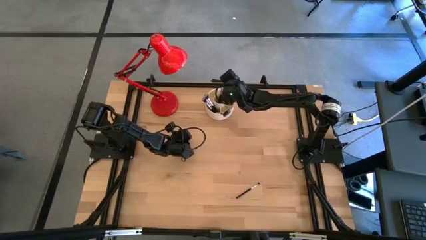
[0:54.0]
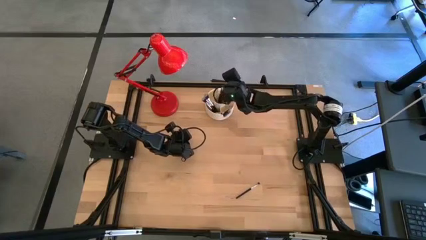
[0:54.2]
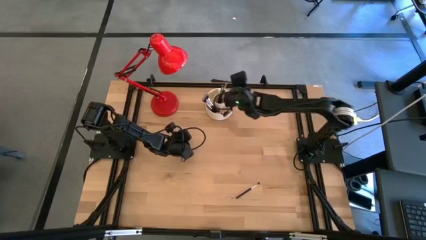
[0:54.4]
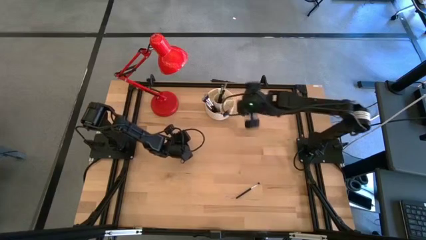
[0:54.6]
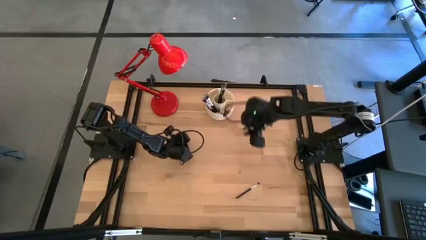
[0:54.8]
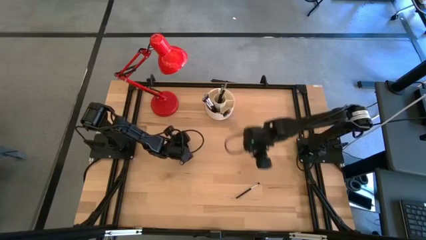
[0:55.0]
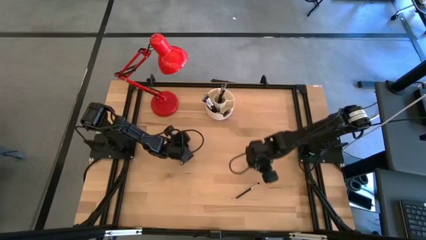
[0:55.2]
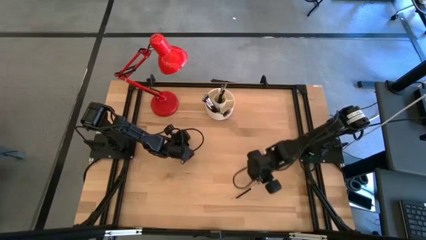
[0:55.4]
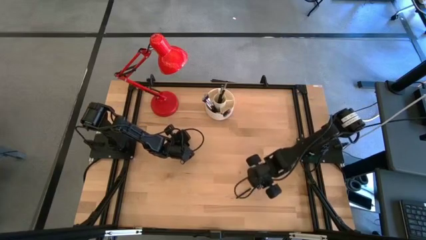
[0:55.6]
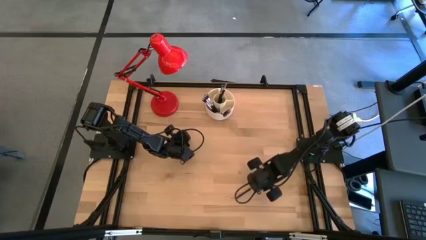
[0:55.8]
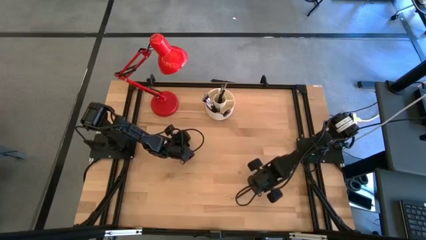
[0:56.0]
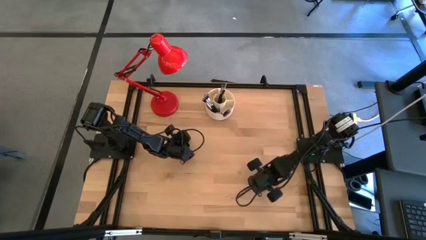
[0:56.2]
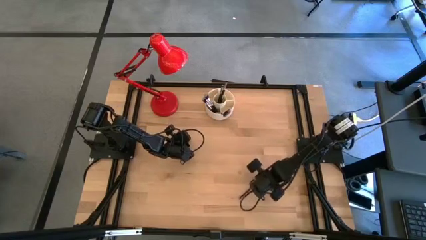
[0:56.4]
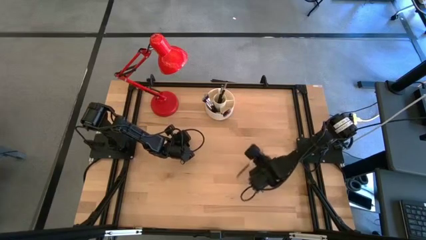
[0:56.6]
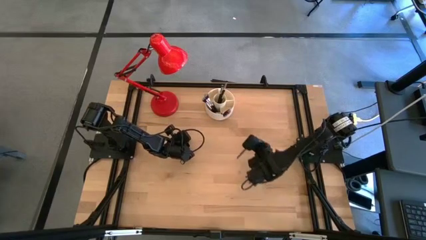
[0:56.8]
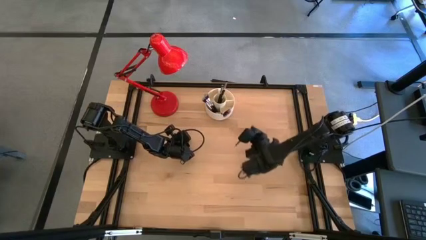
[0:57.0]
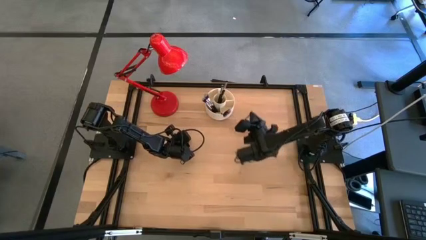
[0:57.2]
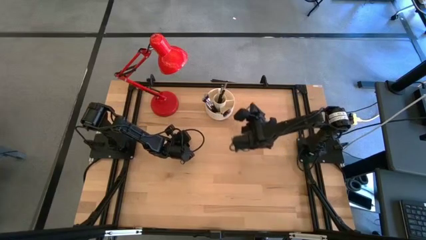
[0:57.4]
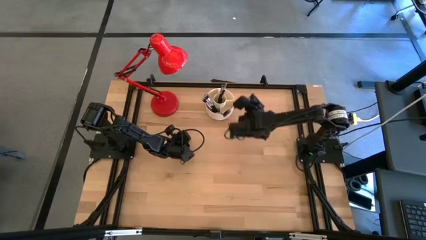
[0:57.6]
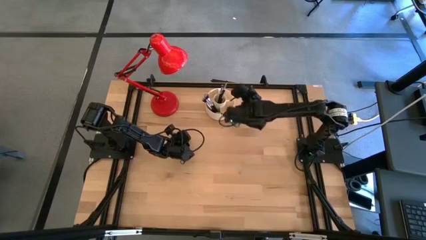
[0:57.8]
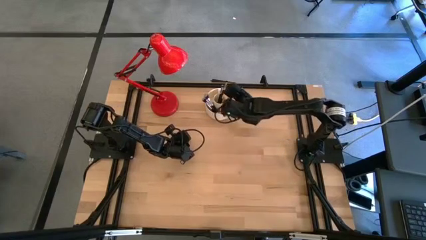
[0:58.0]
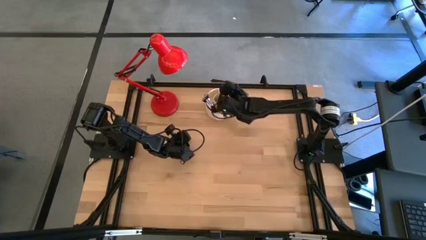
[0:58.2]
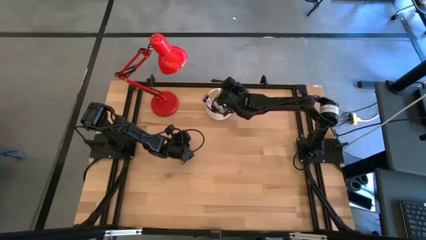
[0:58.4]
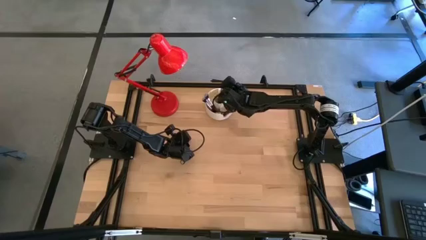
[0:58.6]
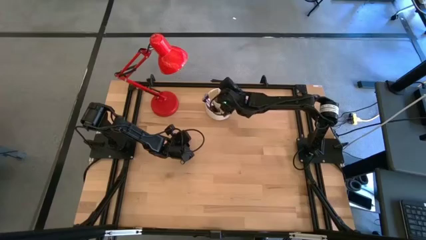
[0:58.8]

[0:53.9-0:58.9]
Task: Put items in baskets/containers
Put the black eyeshadow brush into the white organizer

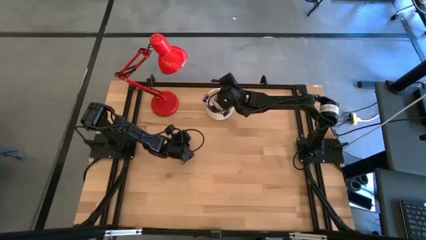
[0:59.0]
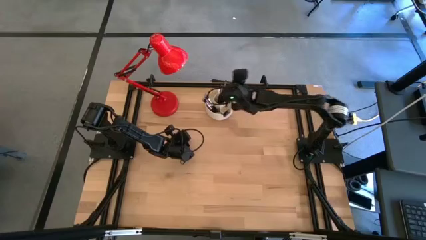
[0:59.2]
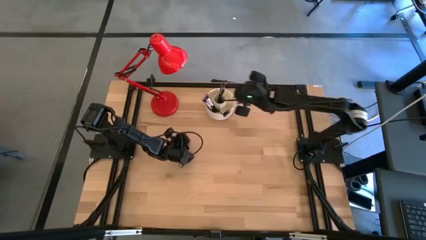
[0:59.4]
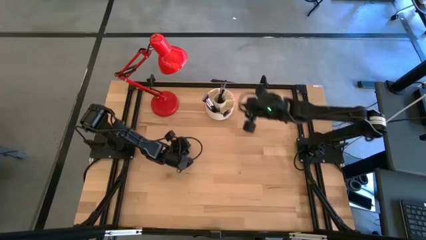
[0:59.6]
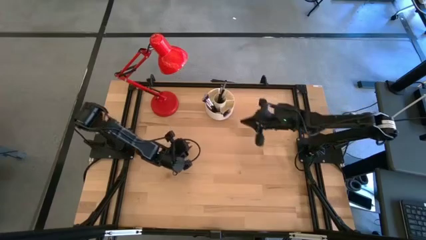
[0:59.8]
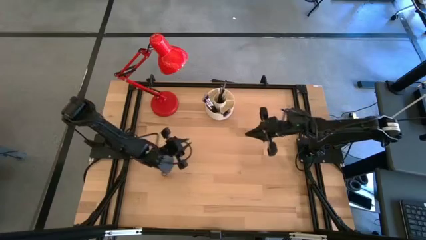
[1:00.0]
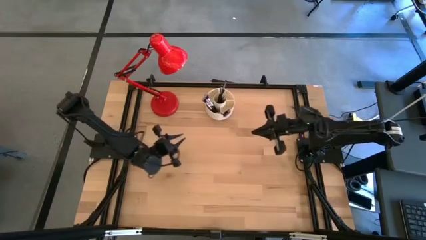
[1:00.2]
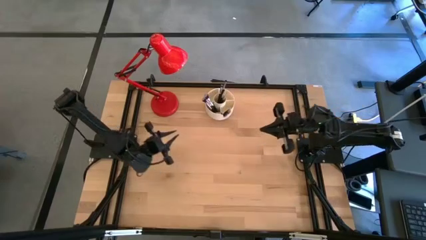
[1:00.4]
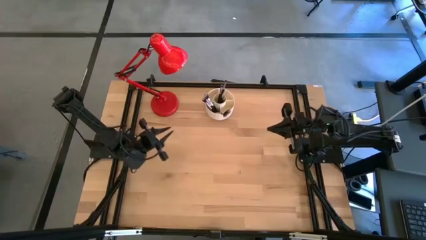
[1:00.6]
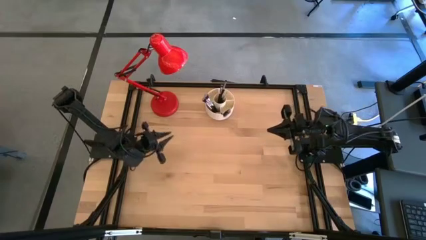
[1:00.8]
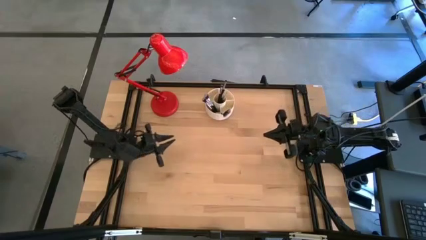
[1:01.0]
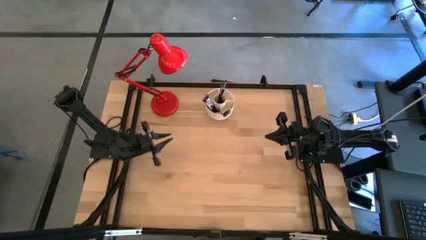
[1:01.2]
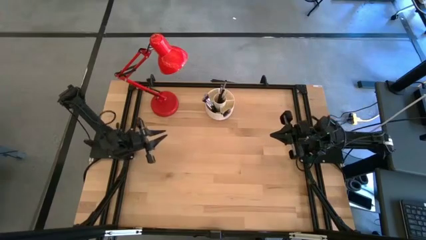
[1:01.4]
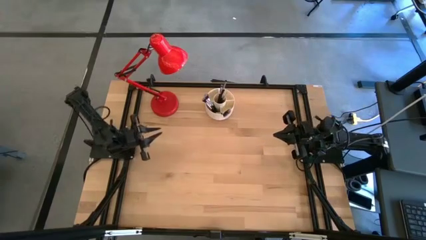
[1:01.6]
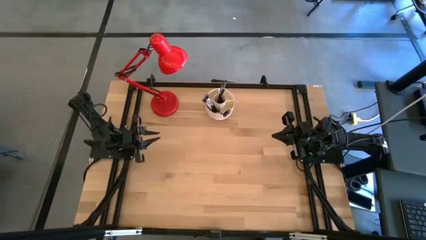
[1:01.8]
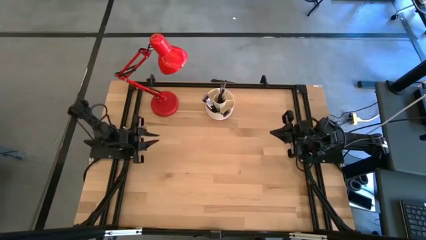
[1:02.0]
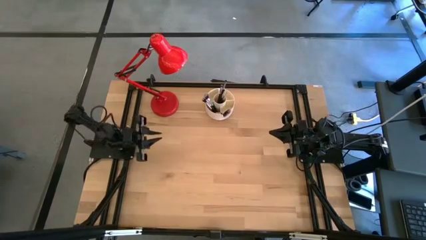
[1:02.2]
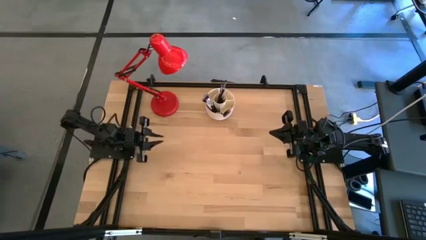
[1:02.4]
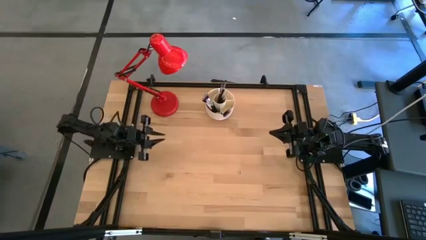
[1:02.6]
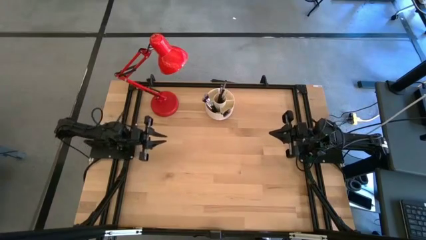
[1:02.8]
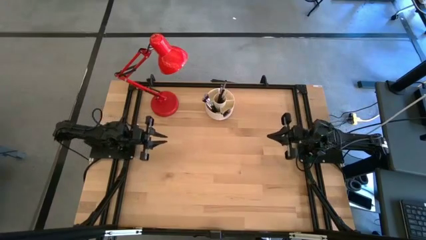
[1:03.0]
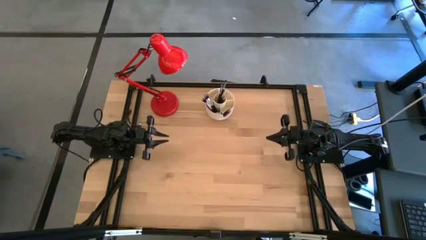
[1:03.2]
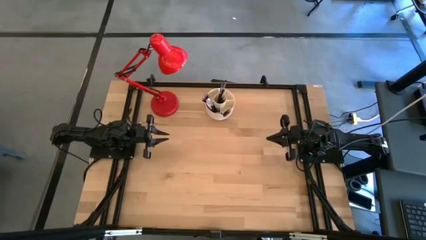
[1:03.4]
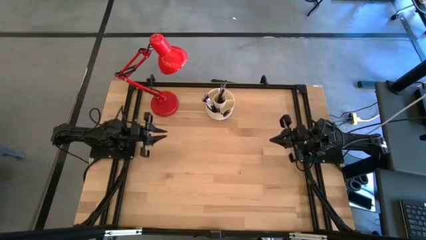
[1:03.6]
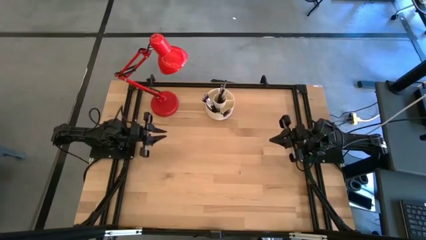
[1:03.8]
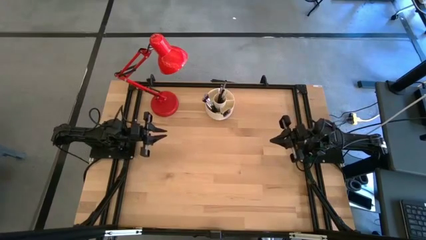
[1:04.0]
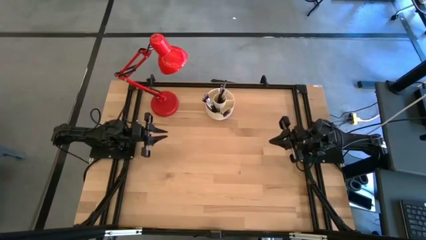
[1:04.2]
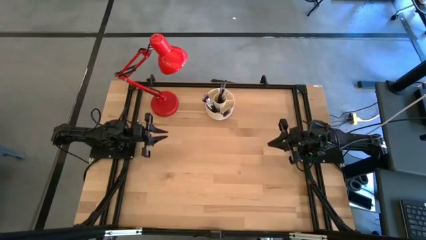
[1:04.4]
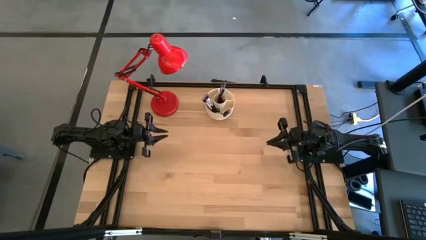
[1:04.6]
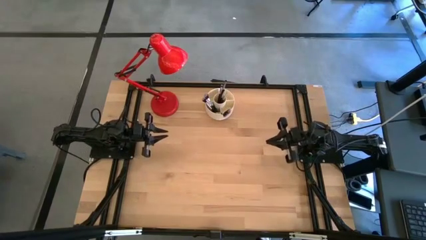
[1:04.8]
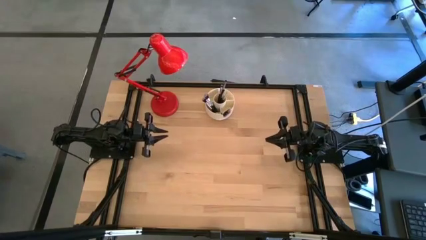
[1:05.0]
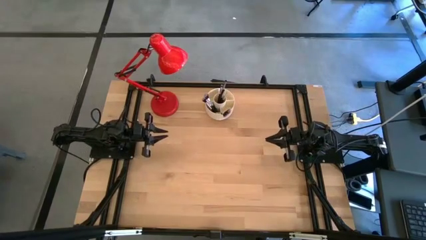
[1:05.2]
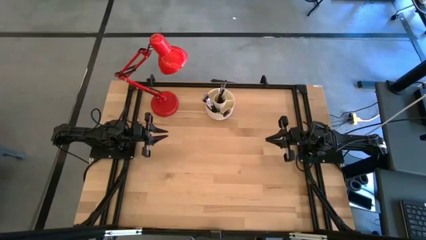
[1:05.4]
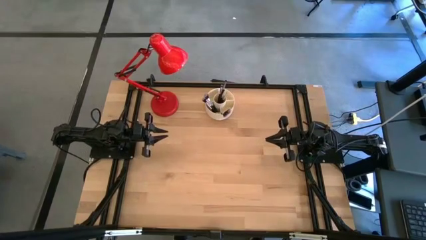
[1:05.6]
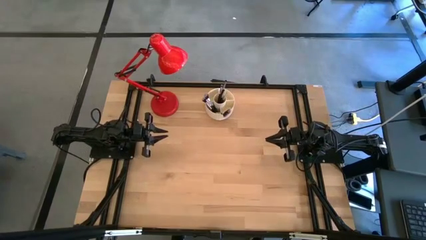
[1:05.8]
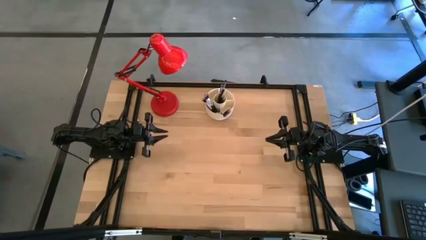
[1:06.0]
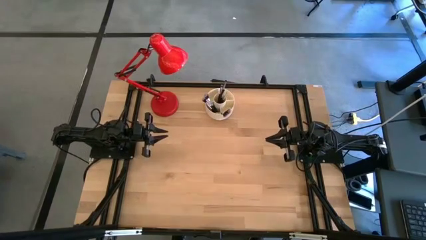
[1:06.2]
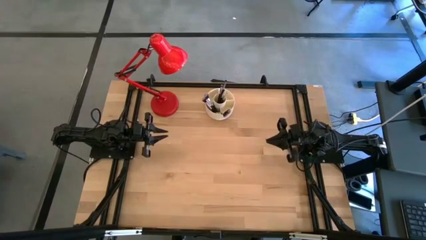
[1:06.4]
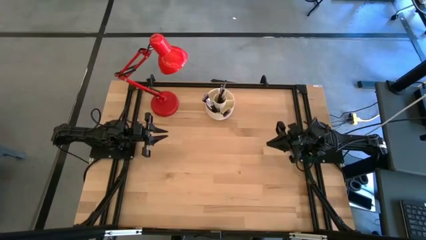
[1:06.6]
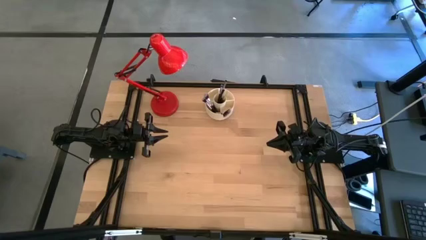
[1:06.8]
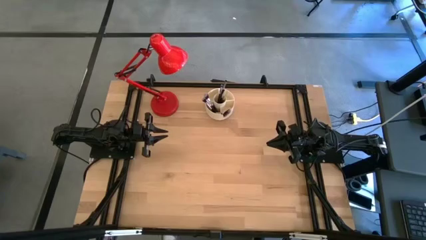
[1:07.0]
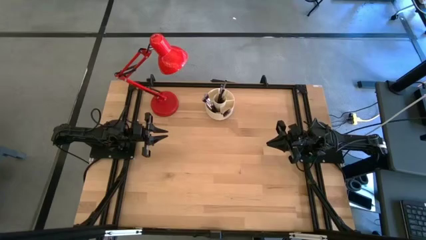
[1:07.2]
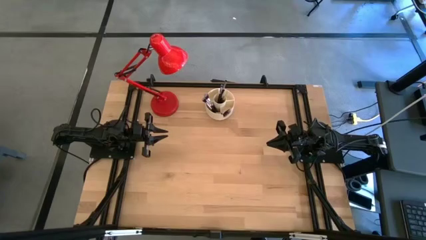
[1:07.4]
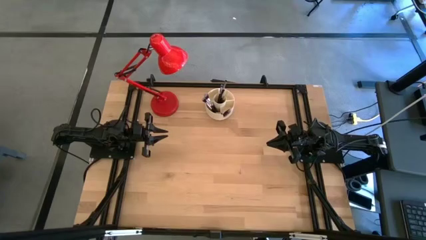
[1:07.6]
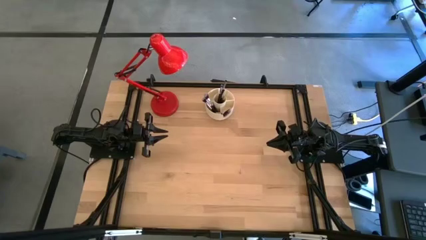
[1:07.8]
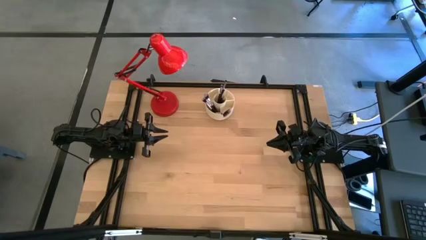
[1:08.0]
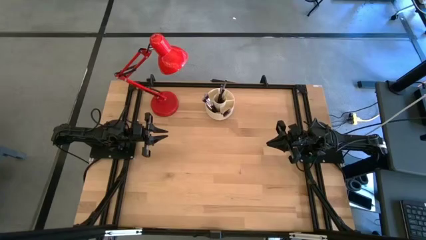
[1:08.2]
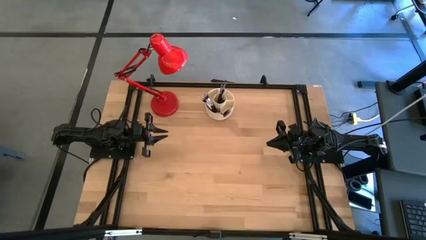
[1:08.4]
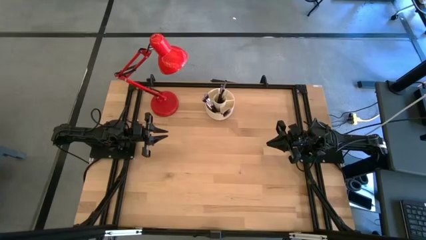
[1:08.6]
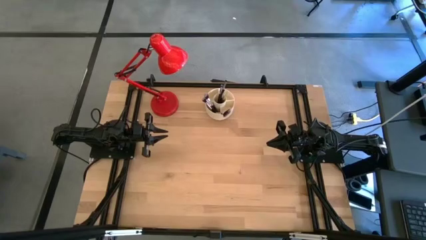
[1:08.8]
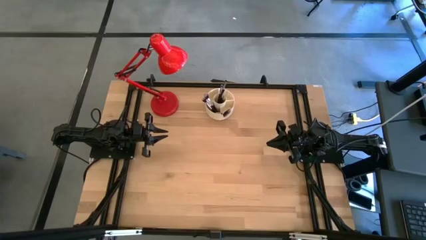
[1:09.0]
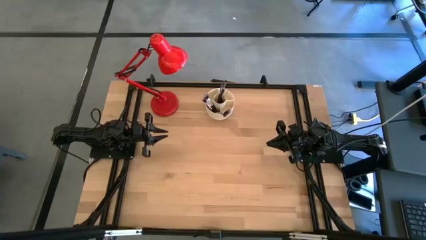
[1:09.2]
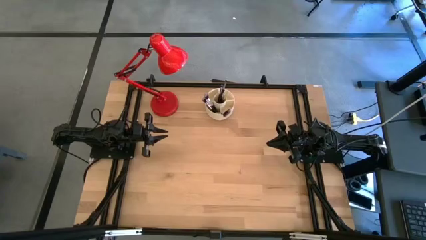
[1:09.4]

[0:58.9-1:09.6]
Return to Home Position

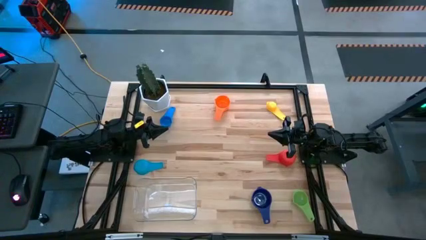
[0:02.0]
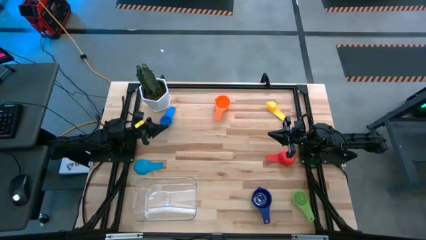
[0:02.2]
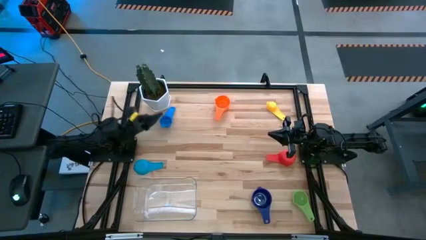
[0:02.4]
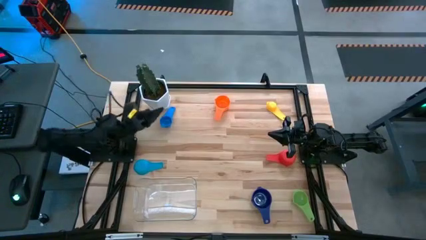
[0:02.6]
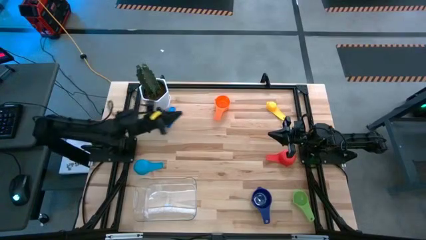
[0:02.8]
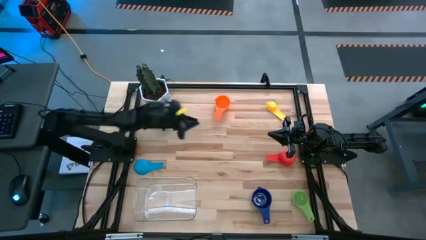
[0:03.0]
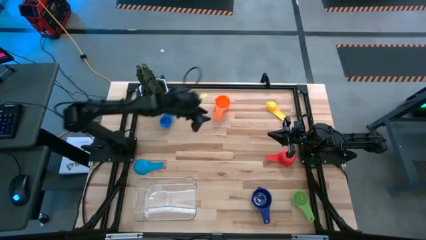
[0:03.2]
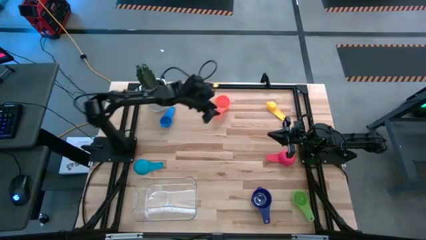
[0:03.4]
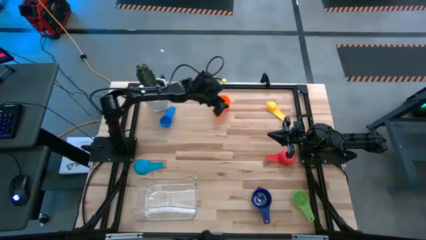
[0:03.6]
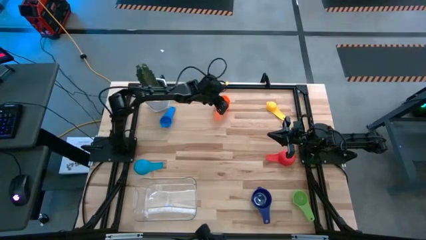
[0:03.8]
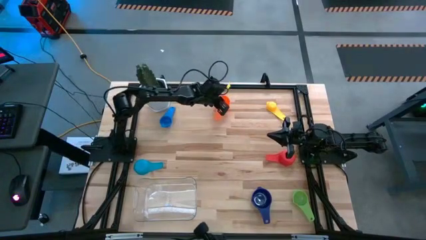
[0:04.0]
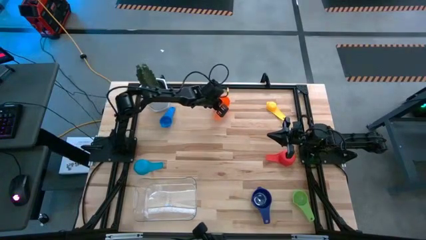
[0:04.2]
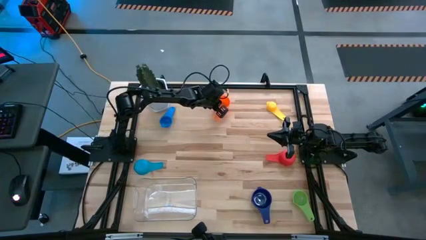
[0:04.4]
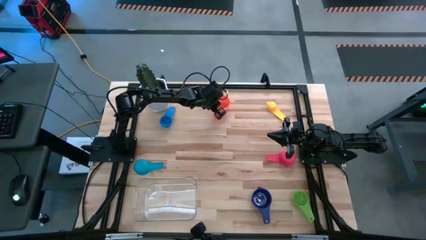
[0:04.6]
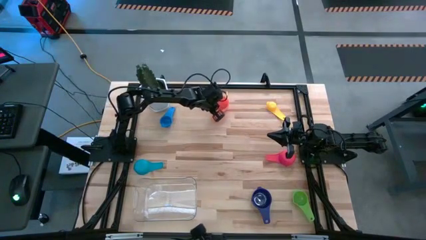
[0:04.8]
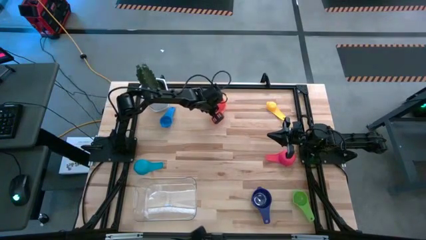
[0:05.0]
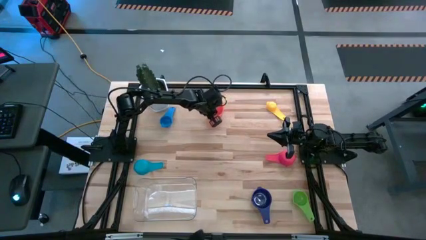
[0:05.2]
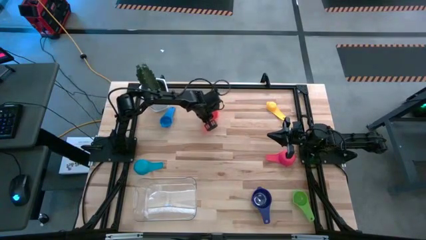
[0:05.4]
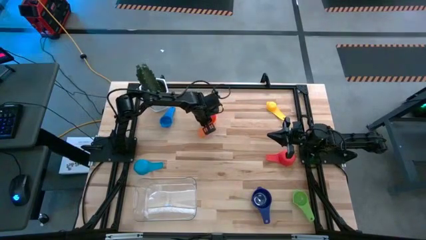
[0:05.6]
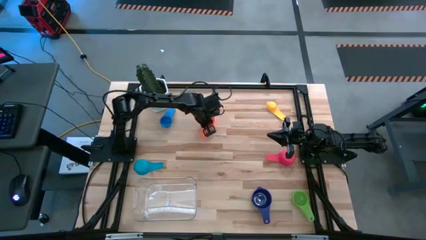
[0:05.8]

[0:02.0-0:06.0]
Task: Nest measuring cups in basket
Move the orange measuring cup to the center of the table
